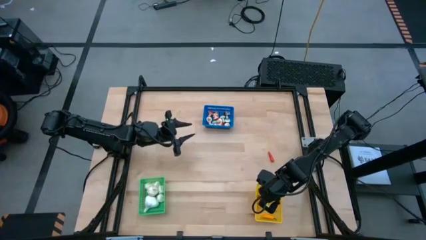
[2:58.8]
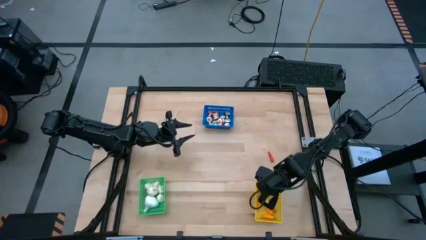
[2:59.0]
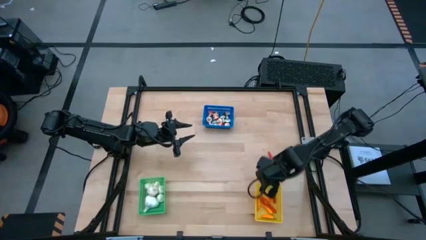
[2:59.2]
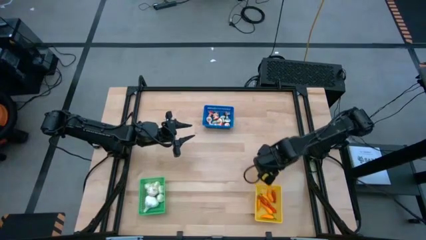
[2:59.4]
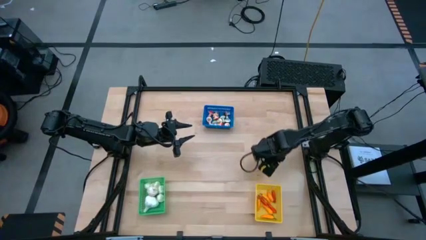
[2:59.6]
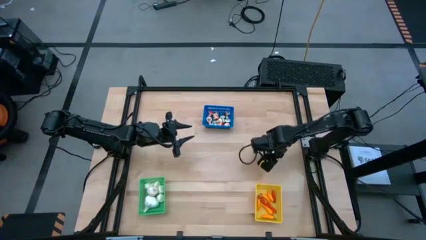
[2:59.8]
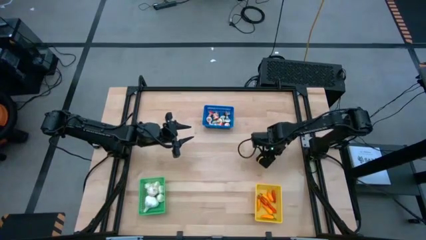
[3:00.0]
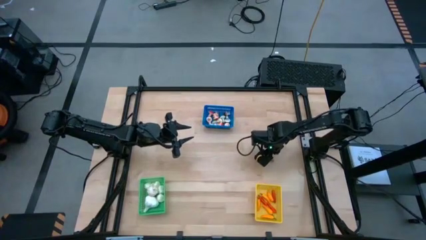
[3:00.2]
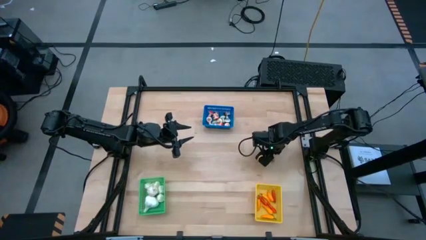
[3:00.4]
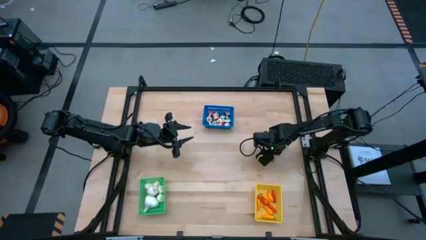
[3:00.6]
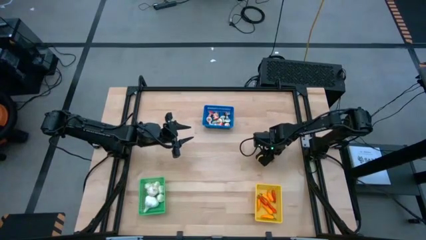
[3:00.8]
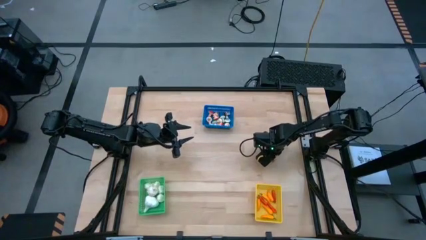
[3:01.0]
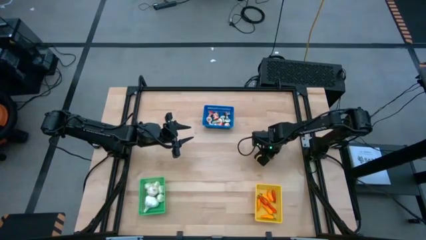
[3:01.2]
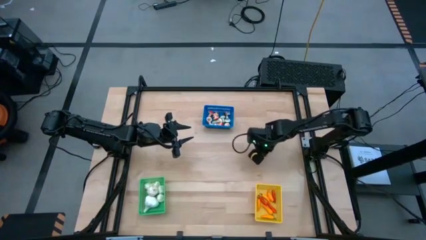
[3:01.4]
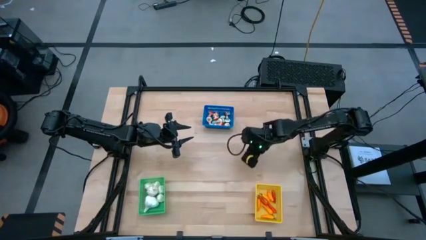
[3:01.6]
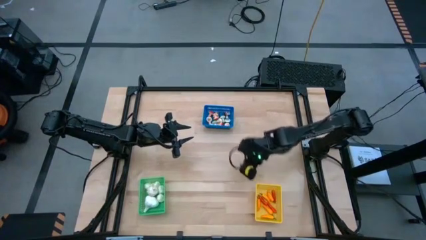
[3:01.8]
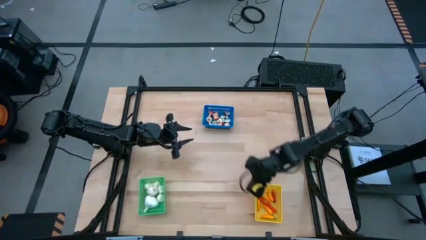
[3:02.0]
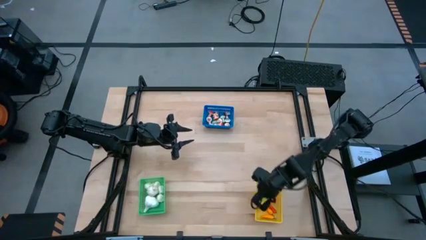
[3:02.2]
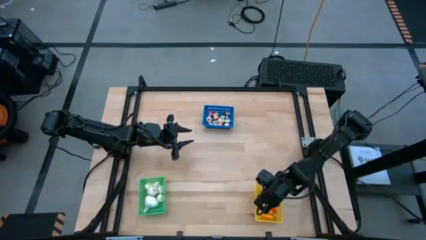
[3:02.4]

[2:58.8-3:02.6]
Task: Sort produce into baskets
Put the orange chili pepper into the yellow bin

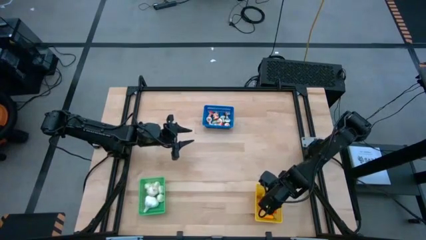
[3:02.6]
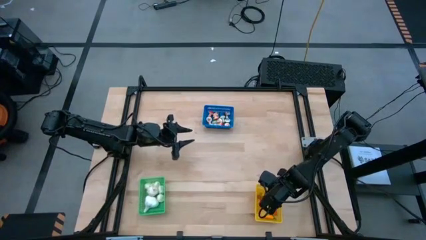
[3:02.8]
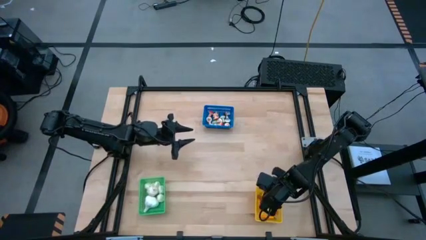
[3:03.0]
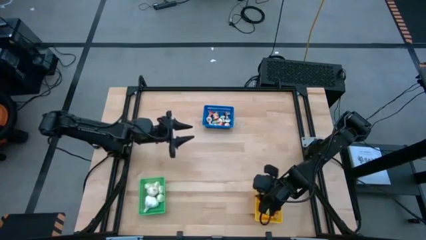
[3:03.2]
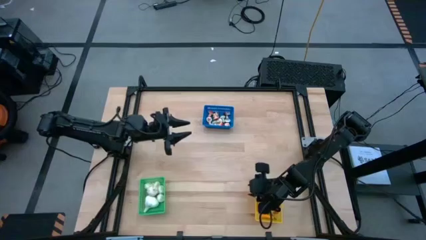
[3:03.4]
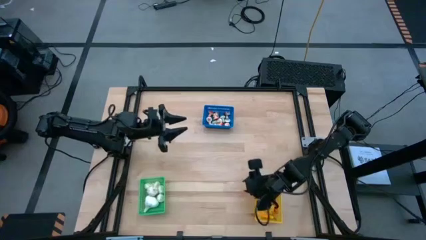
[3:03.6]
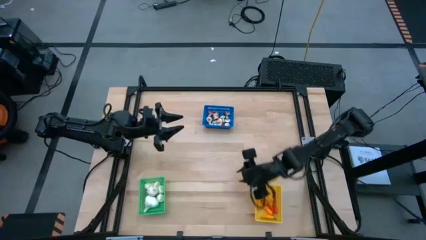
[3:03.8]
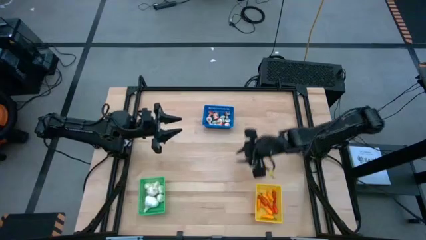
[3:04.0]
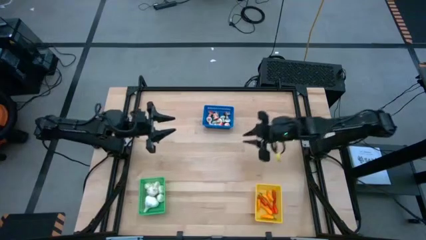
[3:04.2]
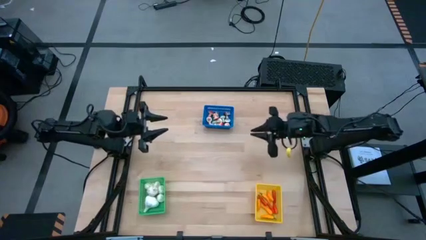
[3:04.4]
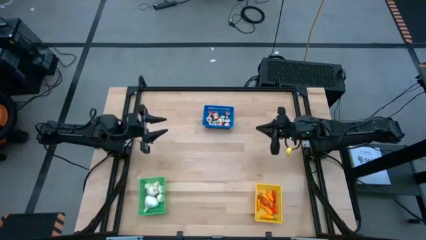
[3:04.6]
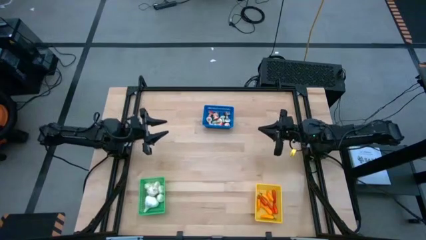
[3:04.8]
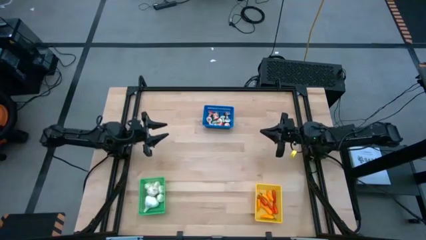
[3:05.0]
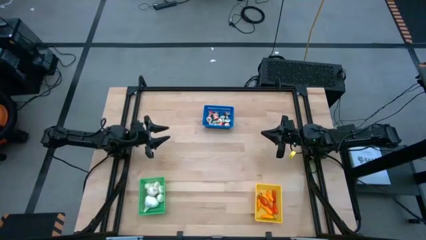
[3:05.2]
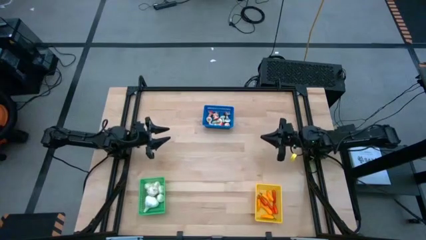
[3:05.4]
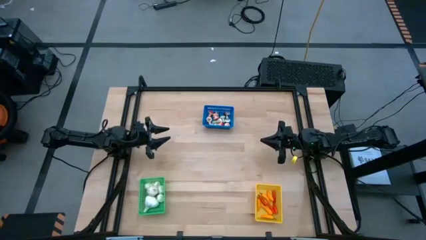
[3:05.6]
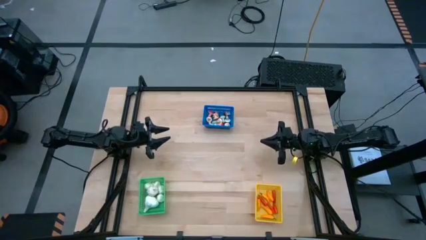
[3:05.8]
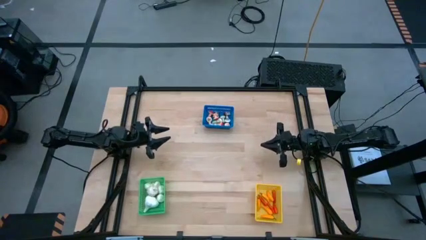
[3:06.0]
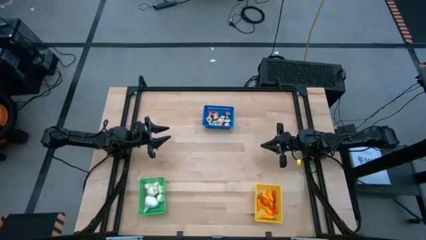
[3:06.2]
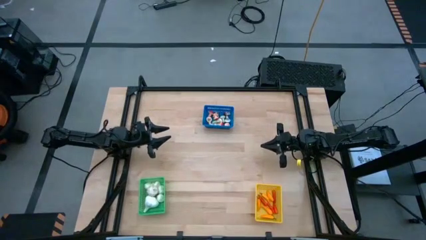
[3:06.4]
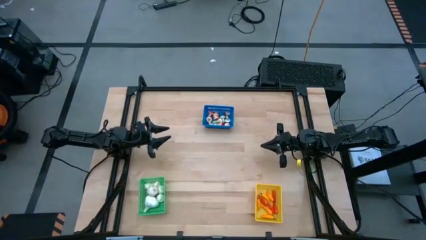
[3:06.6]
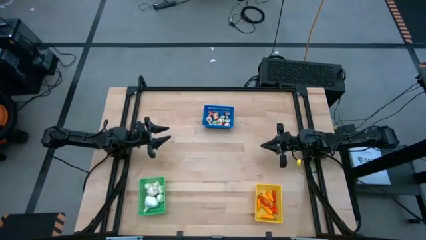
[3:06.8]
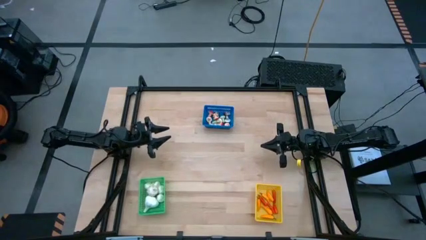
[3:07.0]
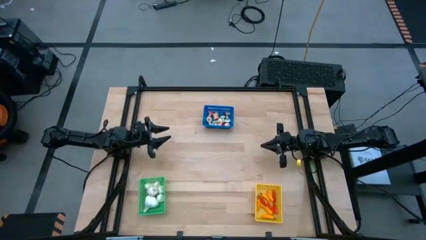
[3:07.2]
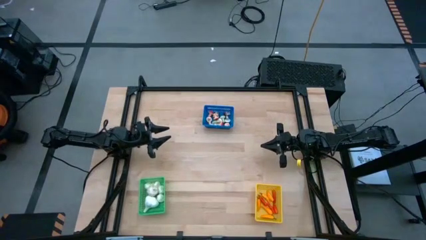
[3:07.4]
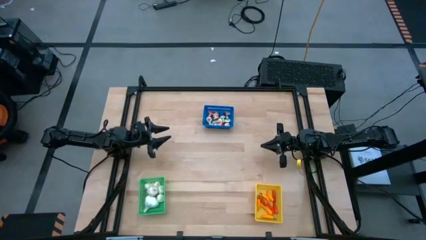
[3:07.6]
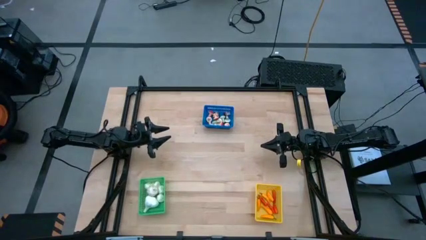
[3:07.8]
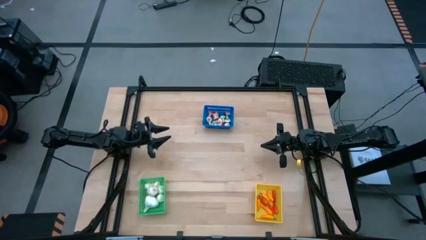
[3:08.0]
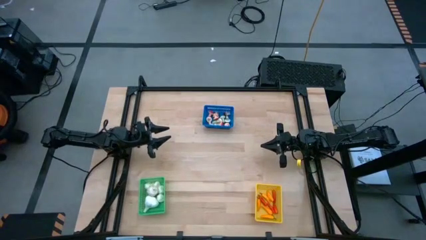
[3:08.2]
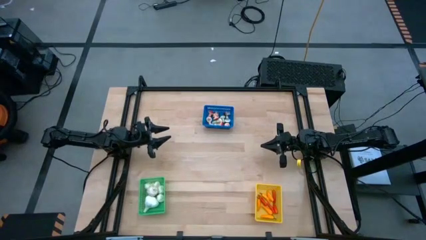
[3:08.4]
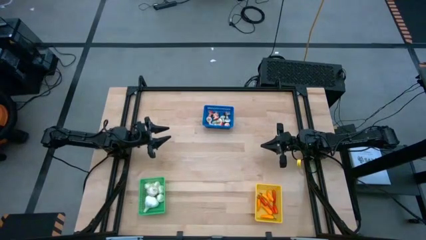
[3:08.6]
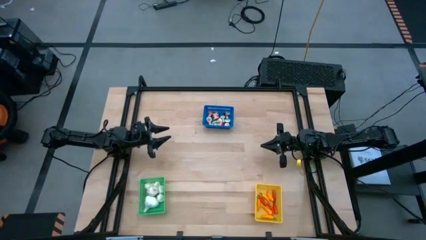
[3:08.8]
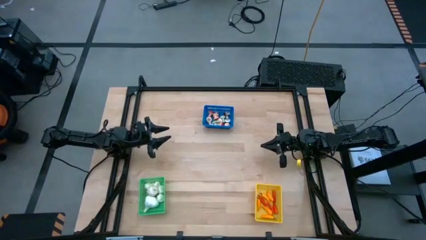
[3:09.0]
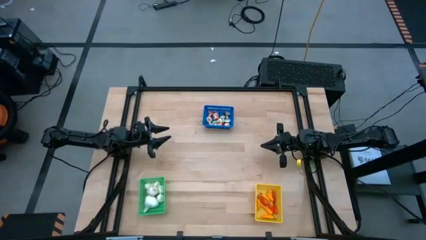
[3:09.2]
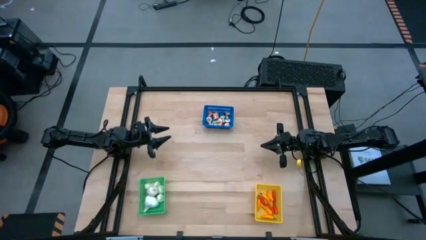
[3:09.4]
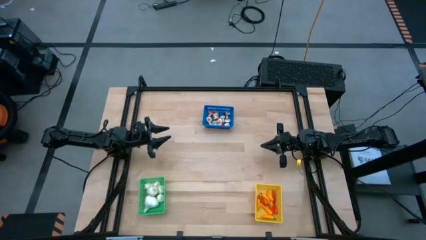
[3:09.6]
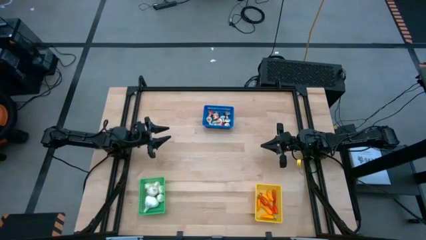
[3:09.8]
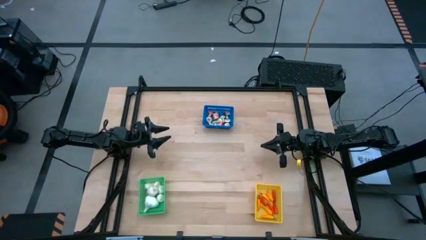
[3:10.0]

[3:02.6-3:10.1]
Return to Home Position

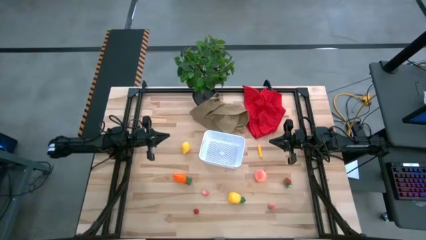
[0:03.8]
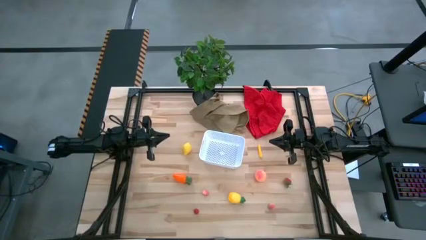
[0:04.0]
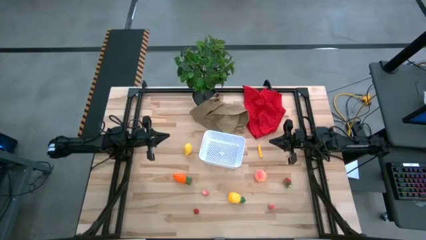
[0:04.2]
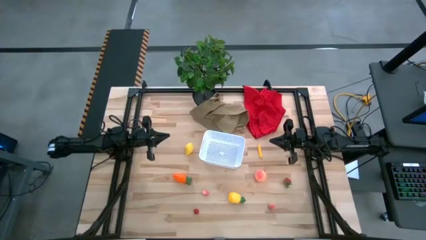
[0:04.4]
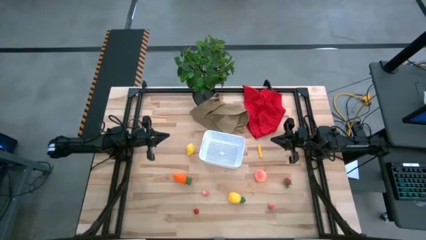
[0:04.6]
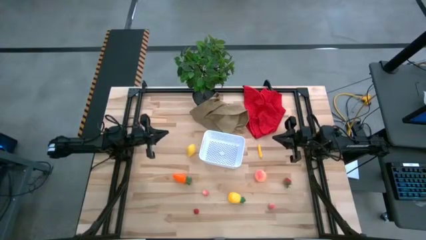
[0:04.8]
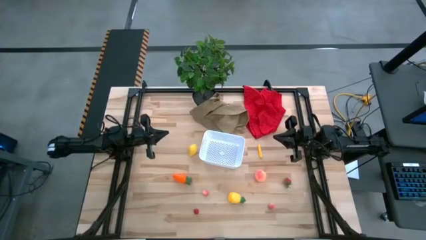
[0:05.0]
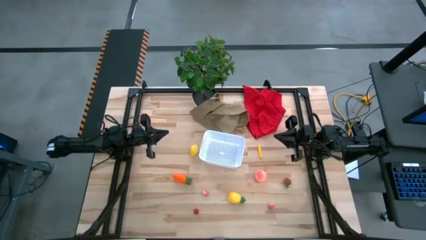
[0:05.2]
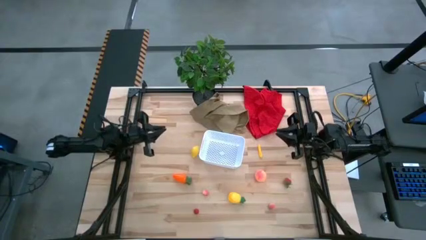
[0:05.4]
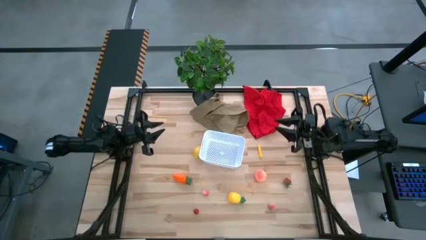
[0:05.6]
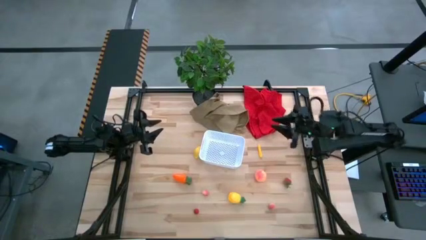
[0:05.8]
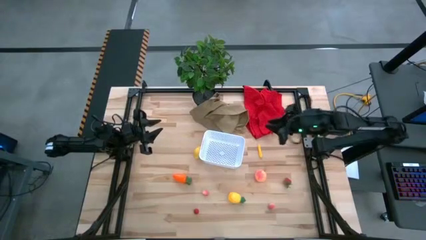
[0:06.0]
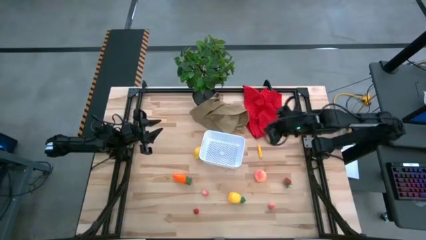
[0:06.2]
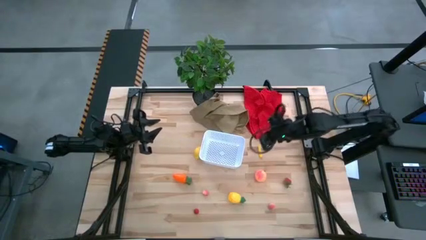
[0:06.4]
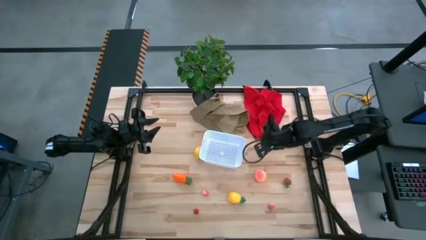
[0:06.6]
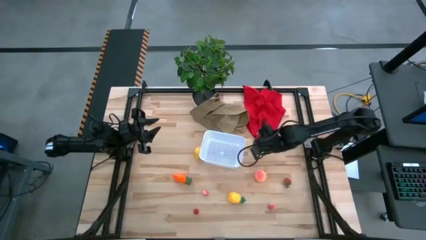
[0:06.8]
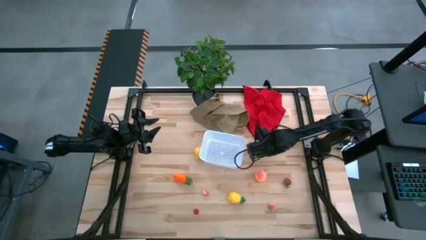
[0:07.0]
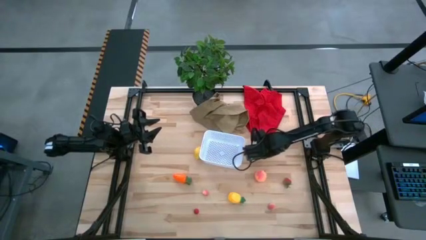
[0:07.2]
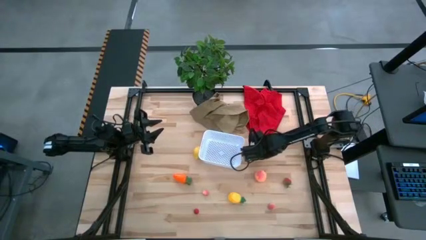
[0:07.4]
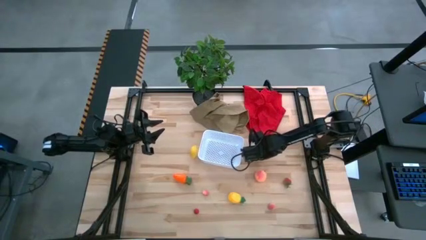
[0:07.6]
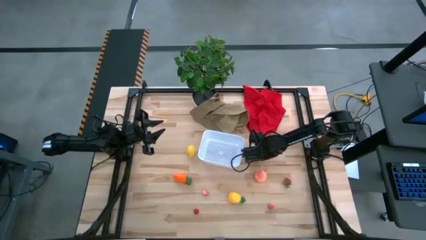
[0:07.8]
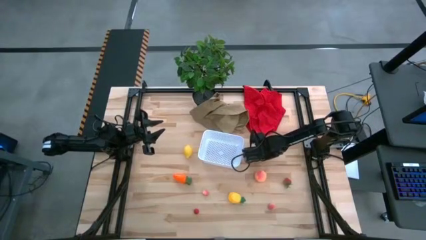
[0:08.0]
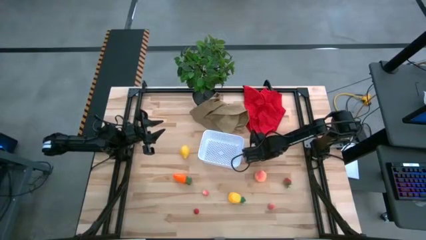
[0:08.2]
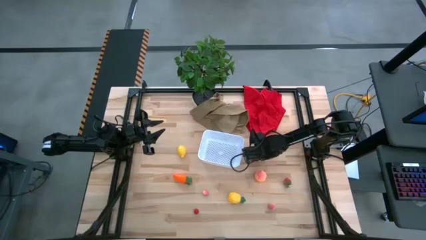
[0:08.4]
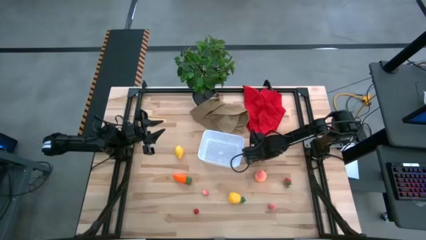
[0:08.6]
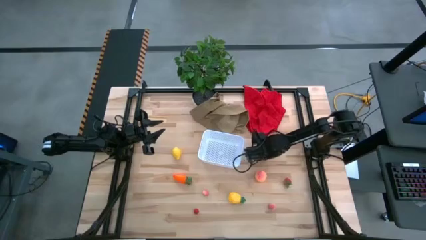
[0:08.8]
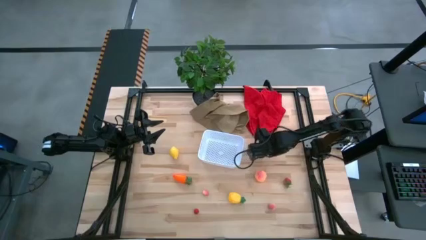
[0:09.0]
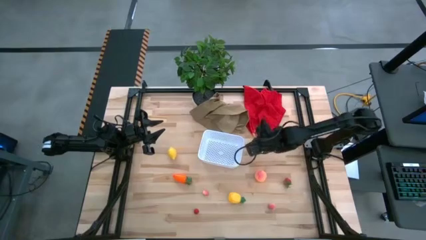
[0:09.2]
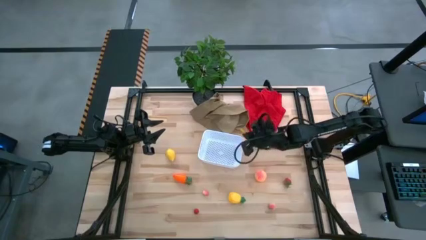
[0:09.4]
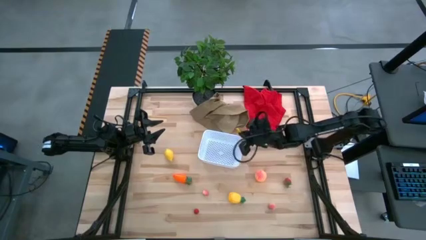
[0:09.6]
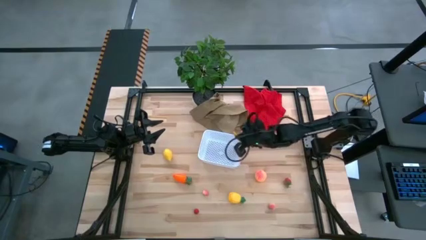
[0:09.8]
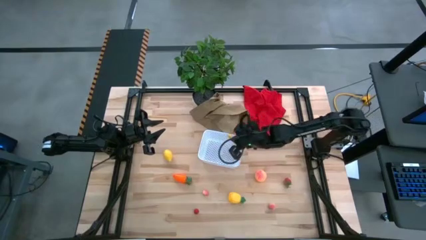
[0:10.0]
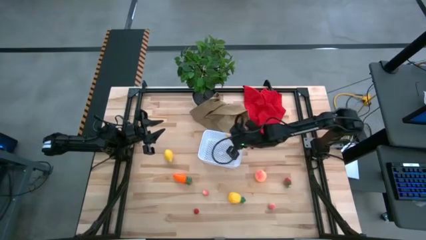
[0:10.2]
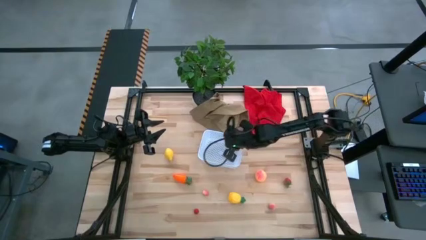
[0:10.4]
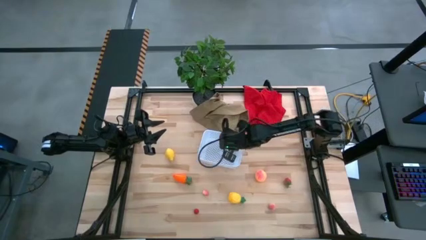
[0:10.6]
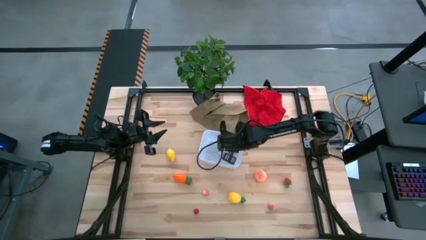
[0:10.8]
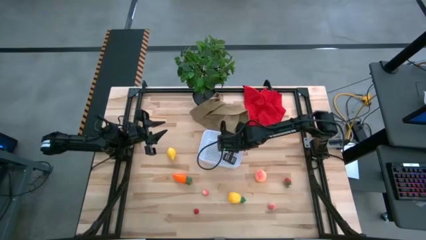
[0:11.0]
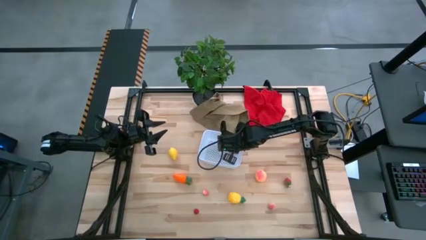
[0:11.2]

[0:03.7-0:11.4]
Task: Pick and placing Produce into tupperware
Put the corn into the bin
